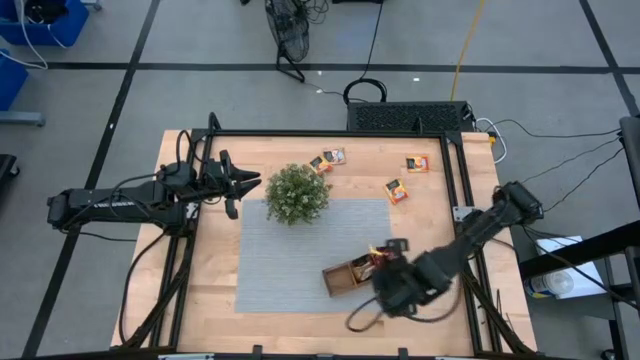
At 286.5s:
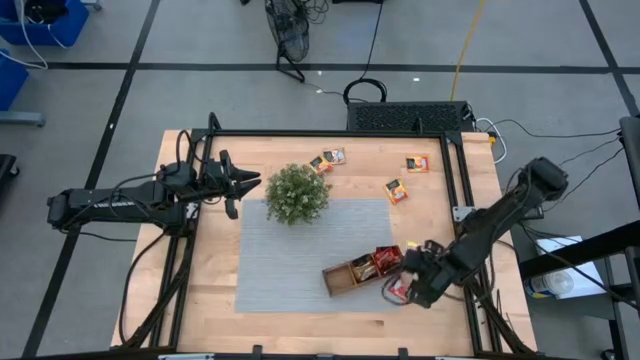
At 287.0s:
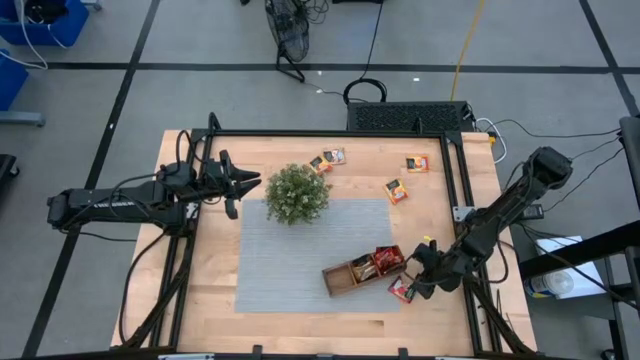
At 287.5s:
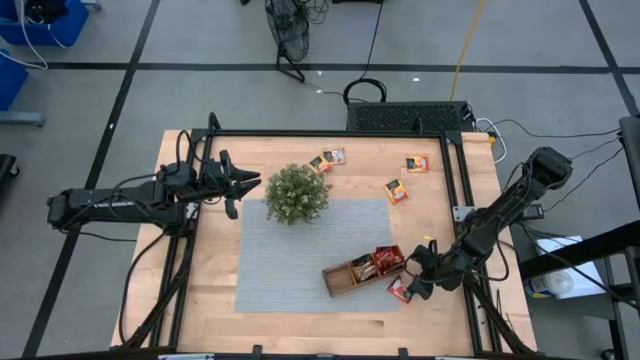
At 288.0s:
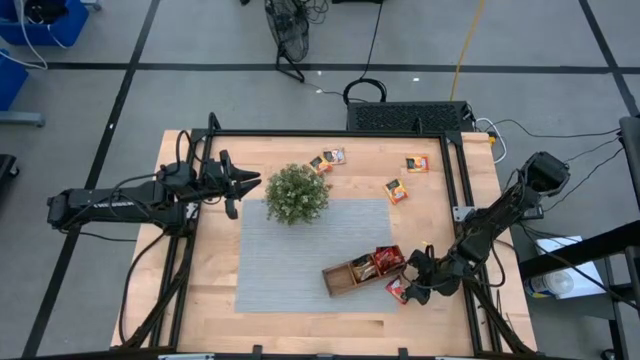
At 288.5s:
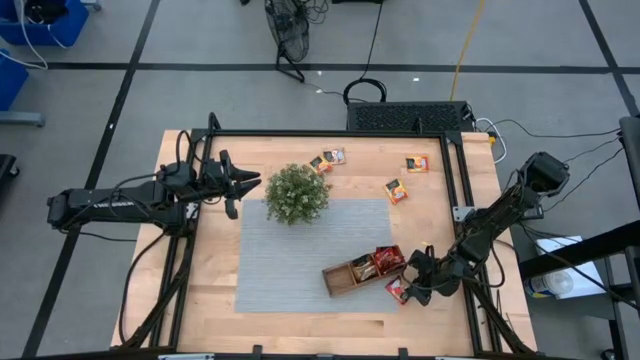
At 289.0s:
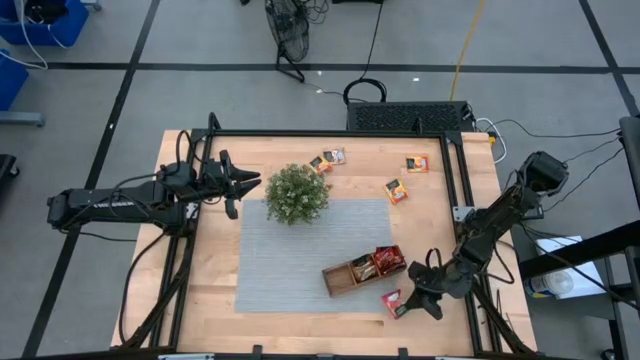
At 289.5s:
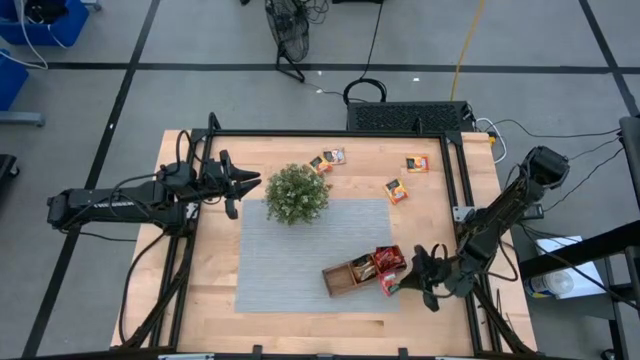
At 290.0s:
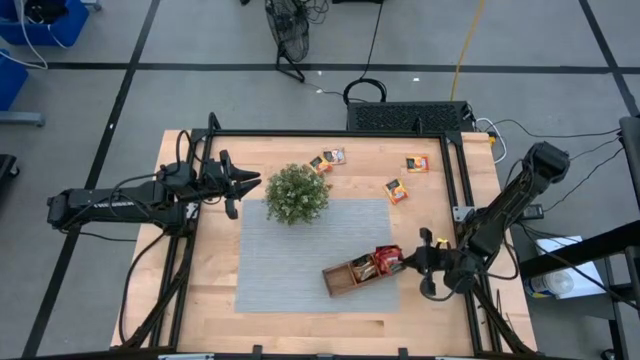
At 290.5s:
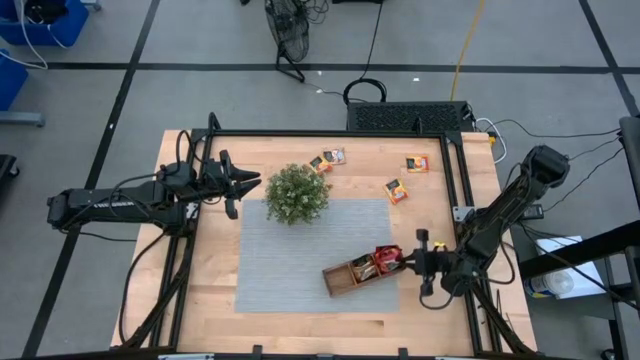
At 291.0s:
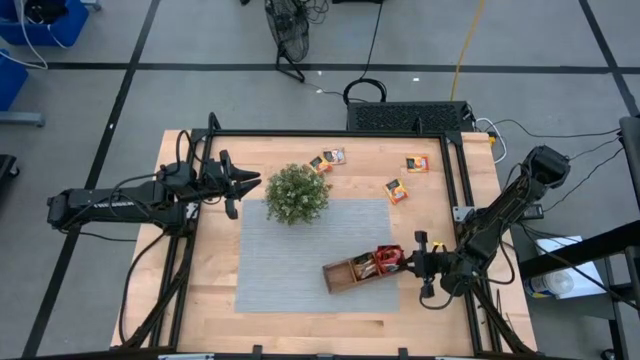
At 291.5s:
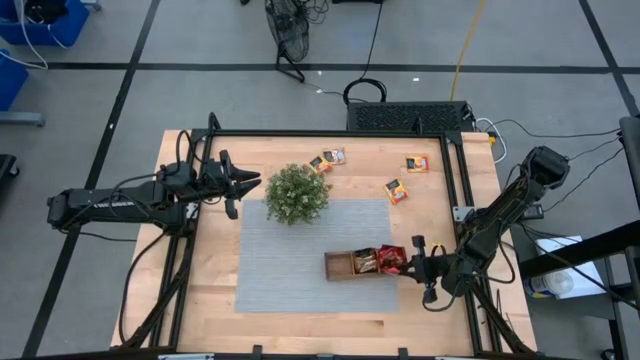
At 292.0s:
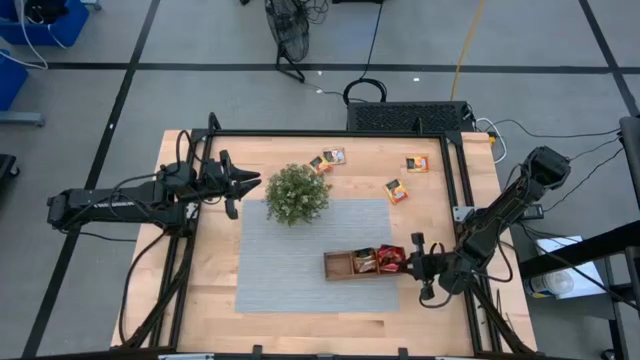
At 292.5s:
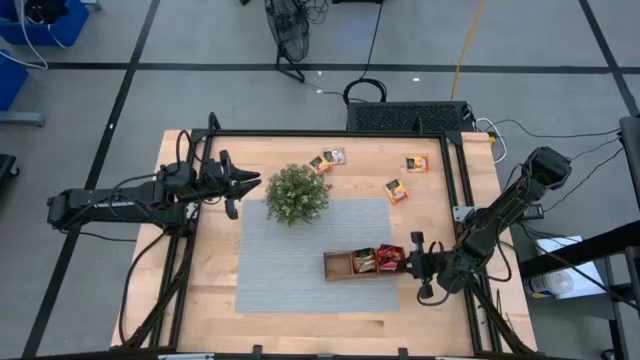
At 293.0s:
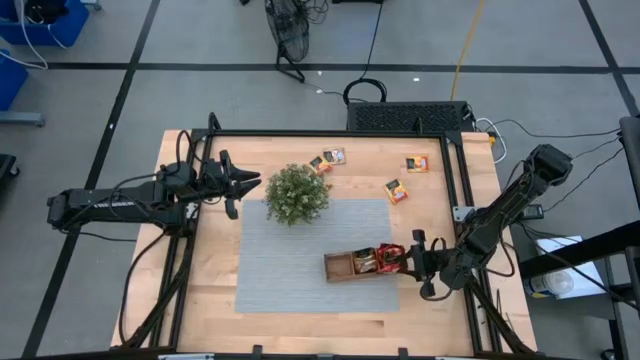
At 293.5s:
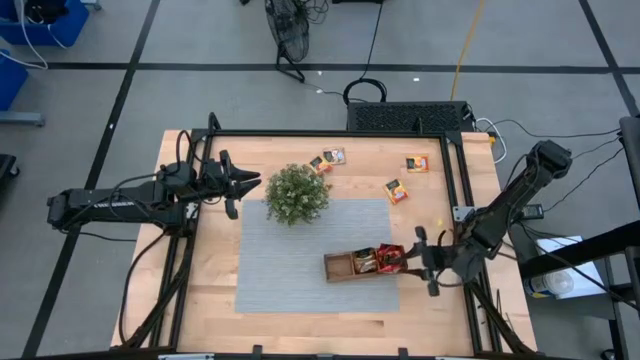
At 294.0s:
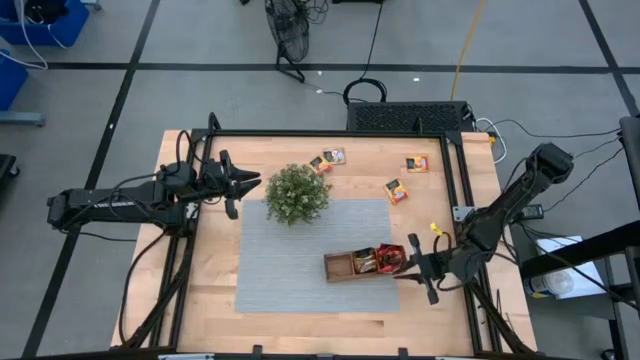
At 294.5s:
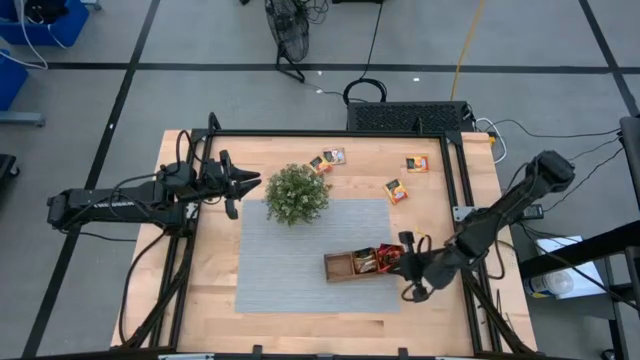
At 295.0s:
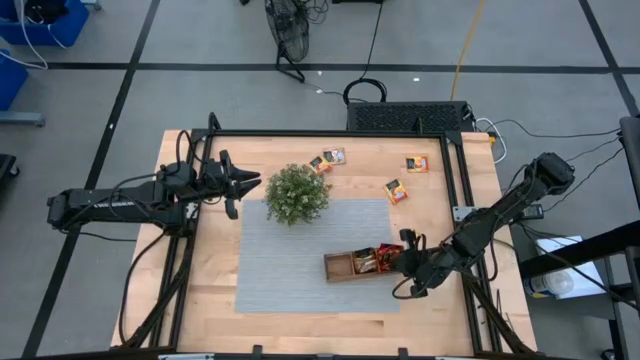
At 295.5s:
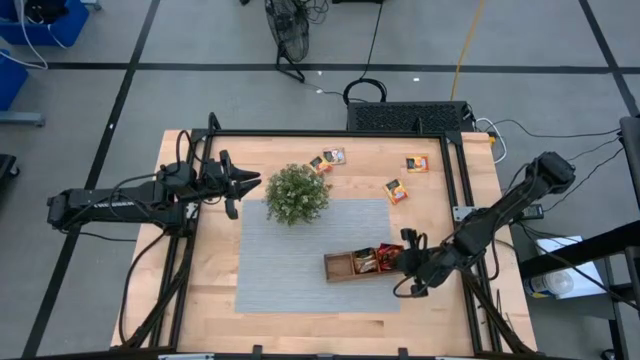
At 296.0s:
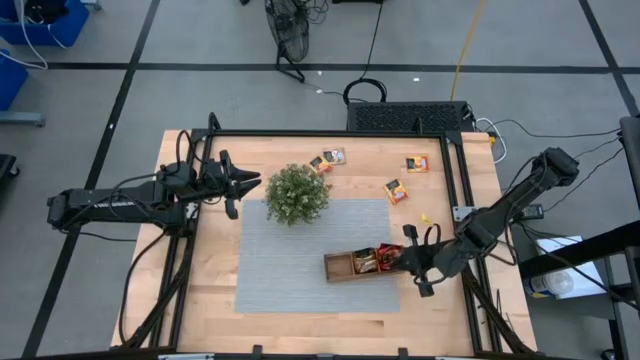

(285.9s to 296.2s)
Task: Pick & Place Tea
Put the strawberry tea sachet into the brown organizer

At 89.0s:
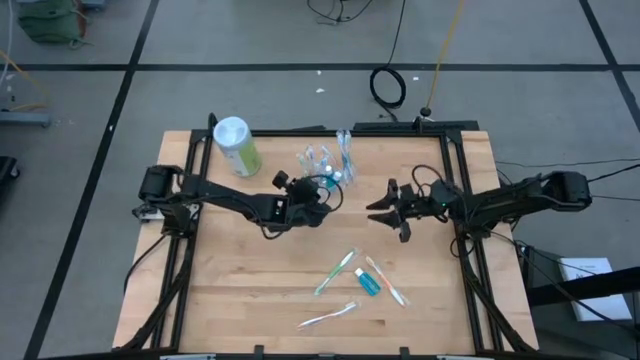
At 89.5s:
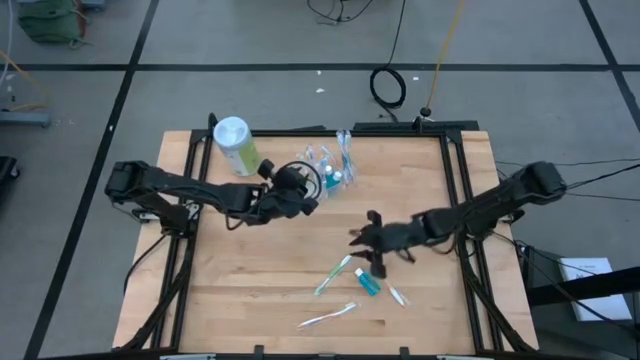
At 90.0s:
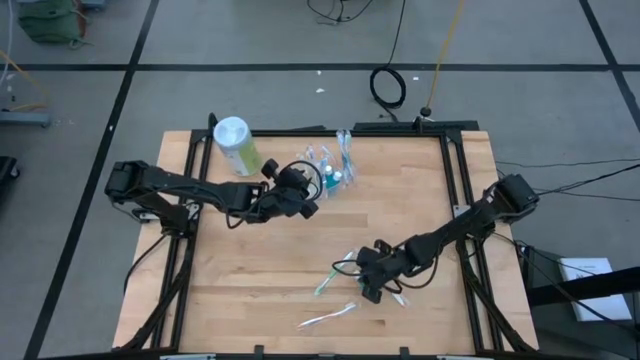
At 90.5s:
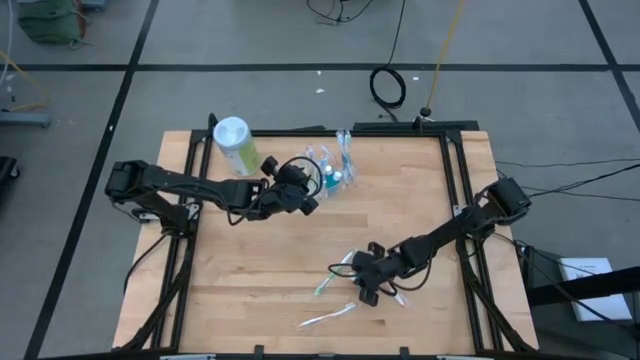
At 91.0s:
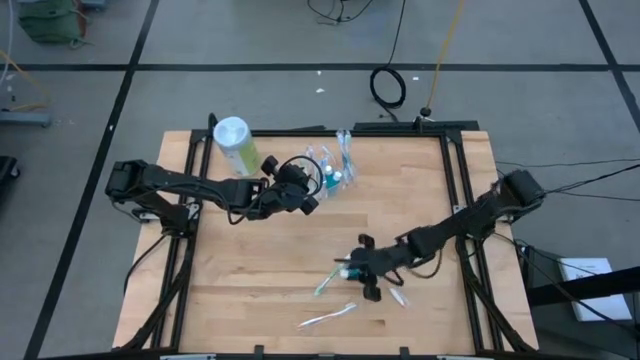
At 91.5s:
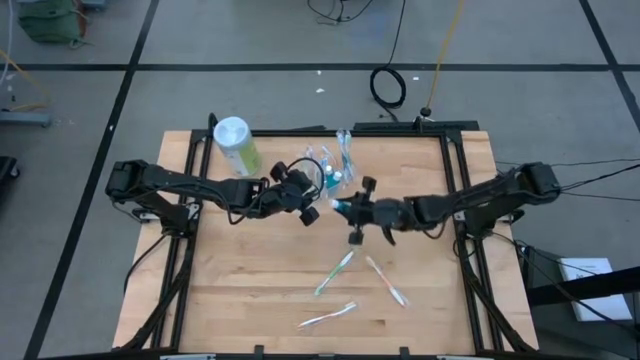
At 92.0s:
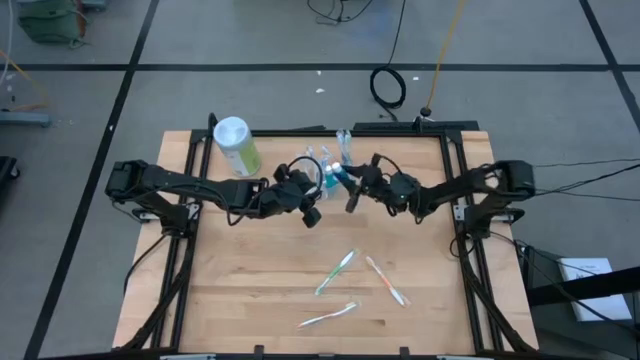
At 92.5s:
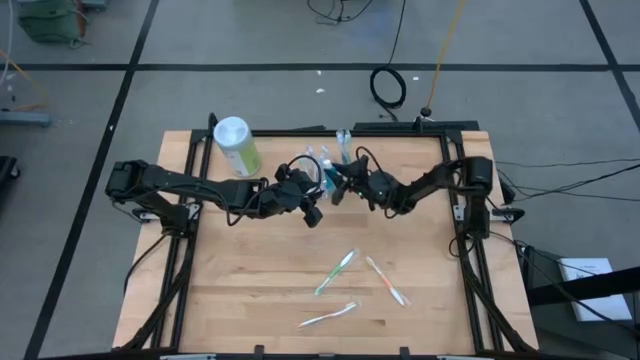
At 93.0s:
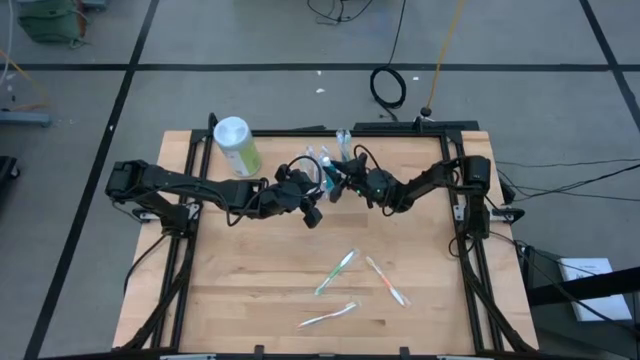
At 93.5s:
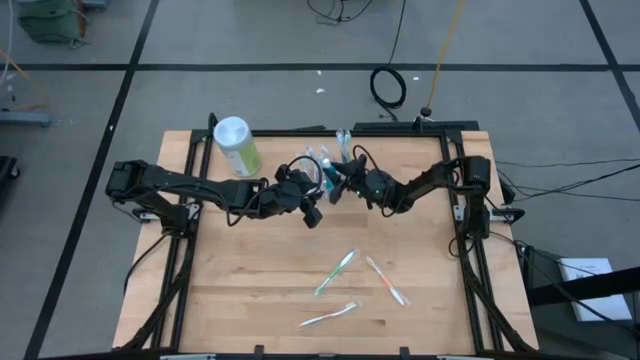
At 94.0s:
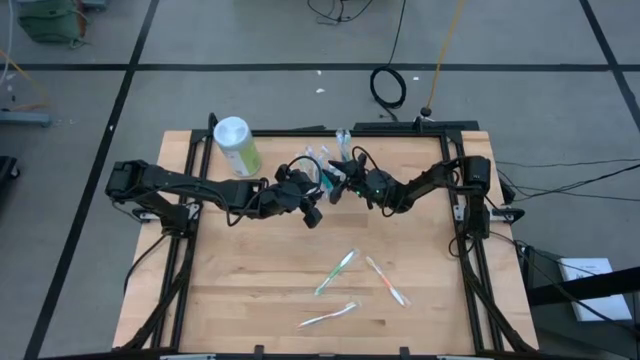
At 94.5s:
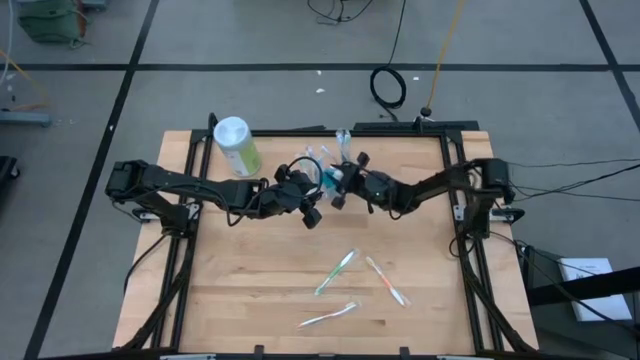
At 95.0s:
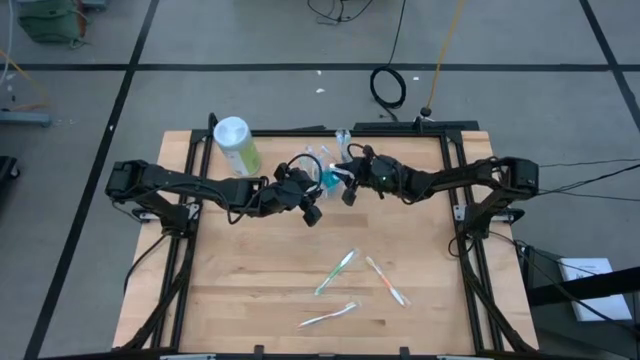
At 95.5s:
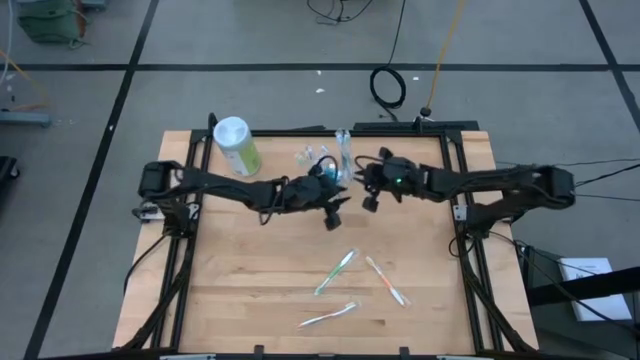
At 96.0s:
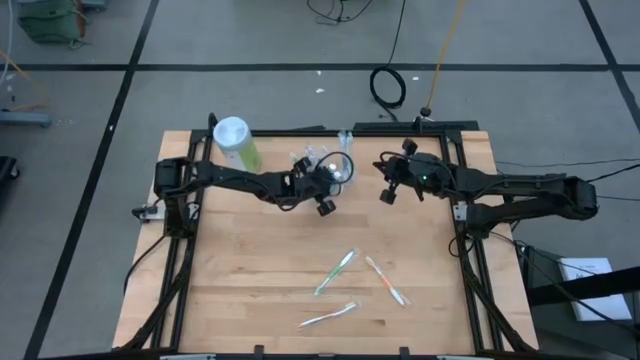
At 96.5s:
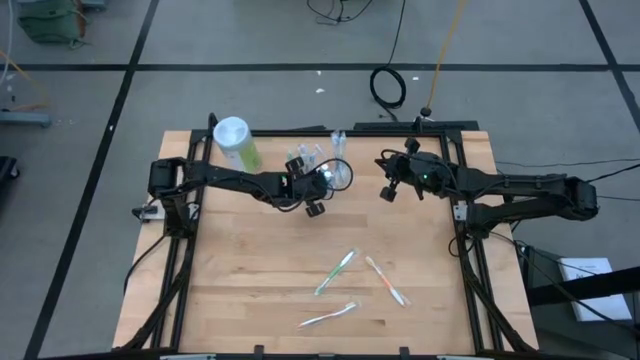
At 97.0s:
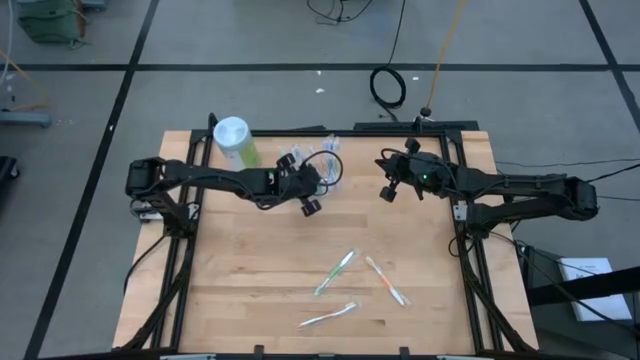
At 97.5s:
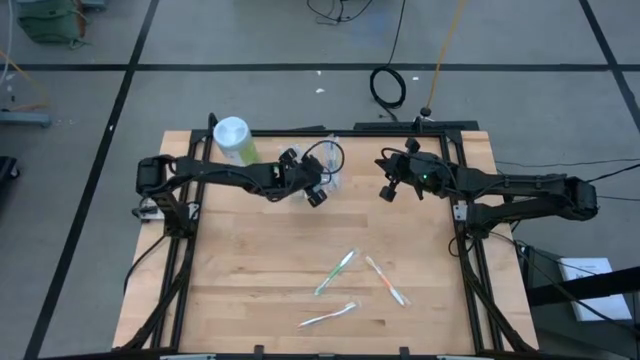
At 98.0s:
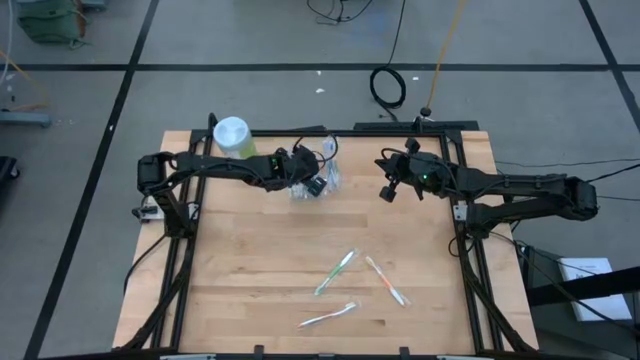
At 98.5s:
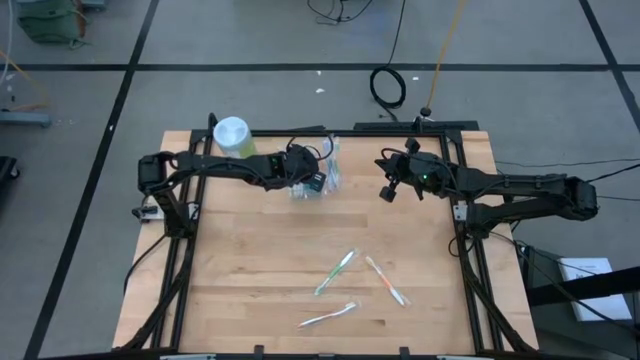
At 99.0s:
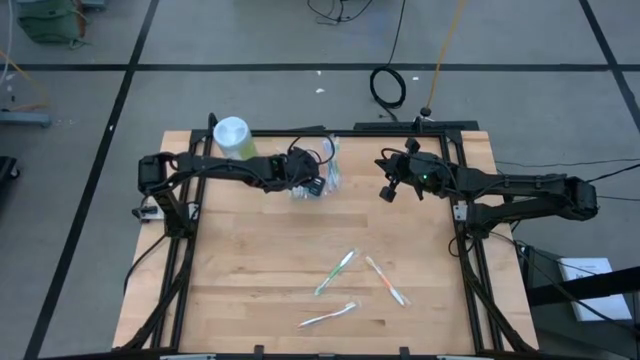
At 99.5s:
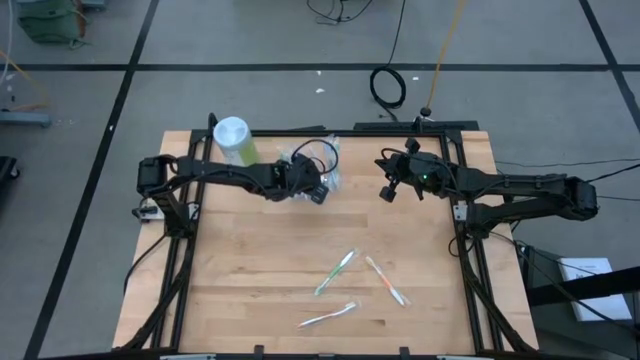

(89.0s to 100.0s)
Task: Pick & Place toothbrushing station
Put the blue mouthwash into the transparent organizer
